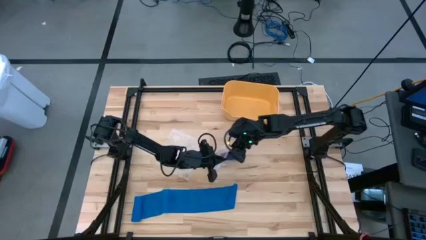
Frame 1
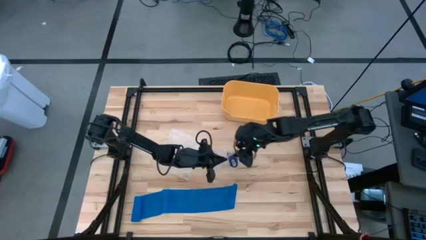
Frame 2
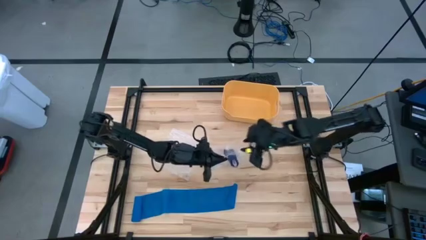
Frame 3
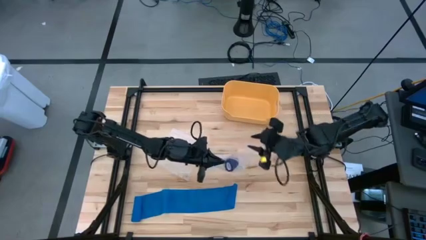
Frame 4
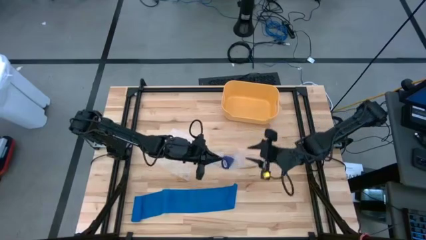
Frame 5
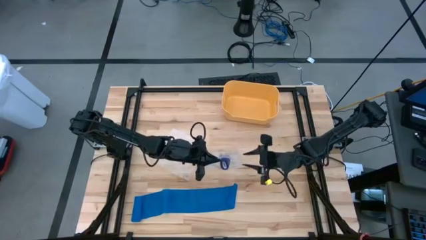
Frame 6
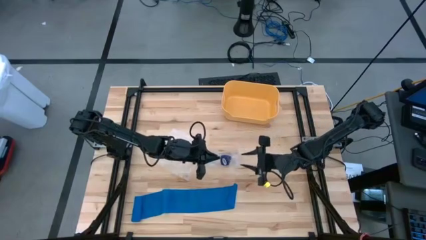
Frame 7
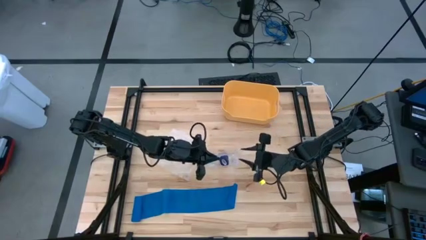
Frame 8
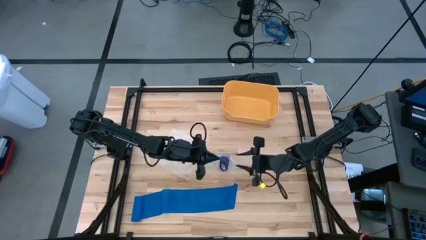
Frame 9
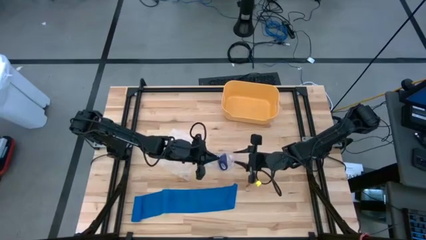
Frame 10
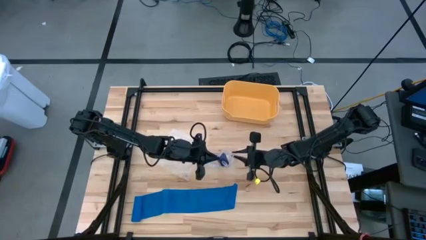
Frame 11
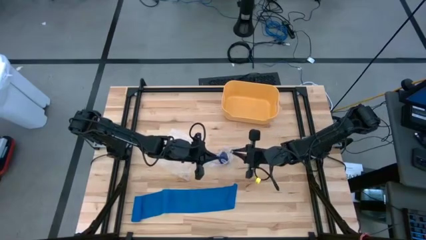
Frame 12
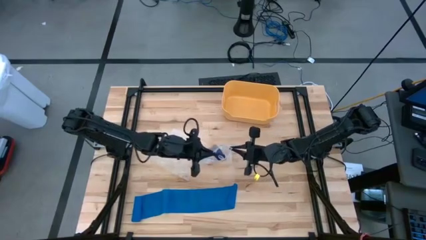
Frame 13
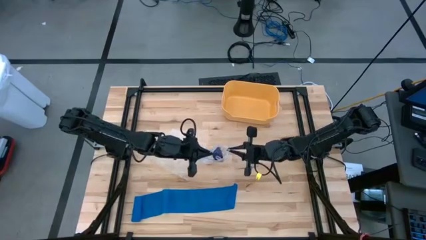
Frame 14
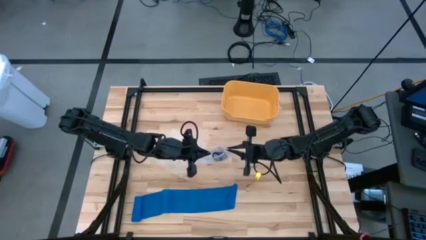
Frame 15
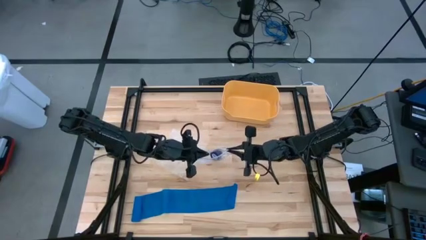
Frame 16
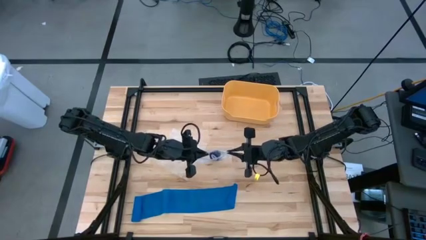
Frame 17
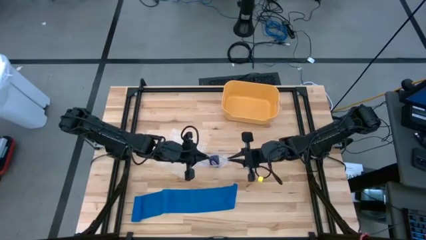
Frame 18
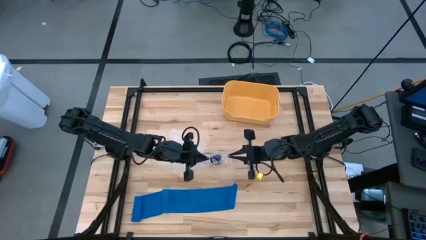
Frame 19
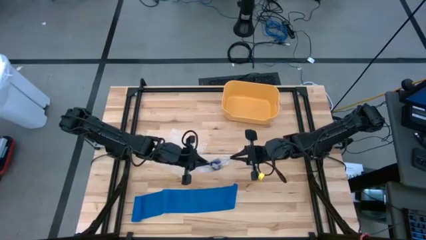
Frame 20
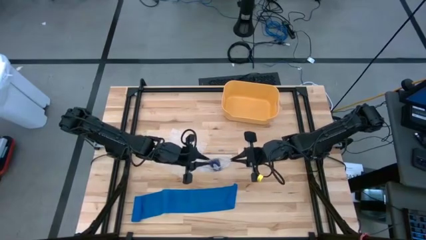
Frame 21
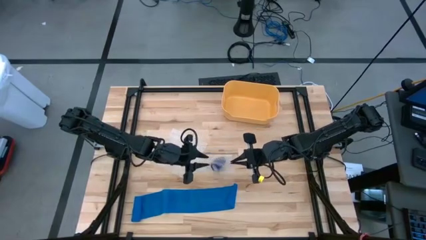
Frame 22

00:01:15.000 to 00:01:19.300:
Task: Roll bandage
Close the transparent zip bag

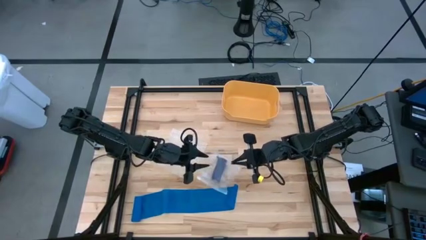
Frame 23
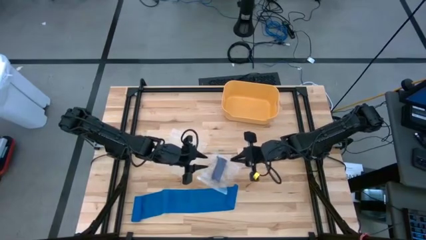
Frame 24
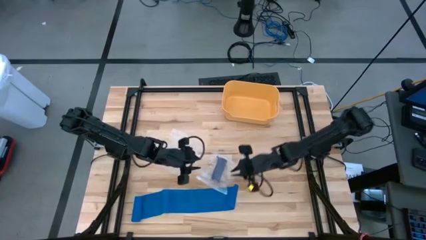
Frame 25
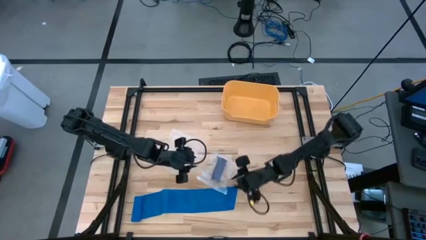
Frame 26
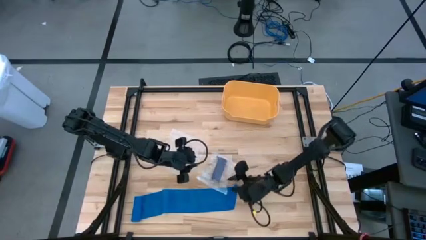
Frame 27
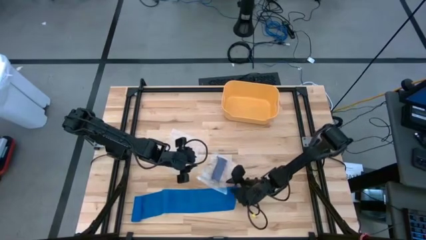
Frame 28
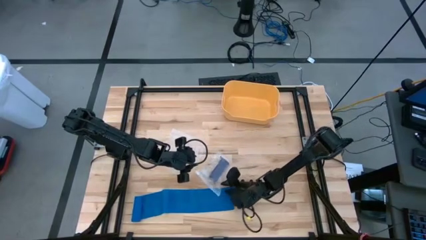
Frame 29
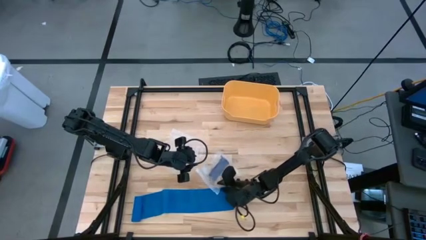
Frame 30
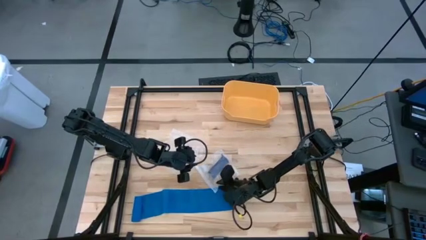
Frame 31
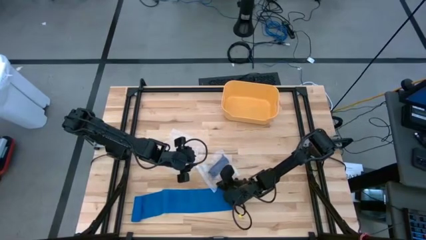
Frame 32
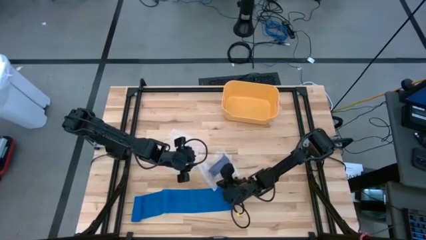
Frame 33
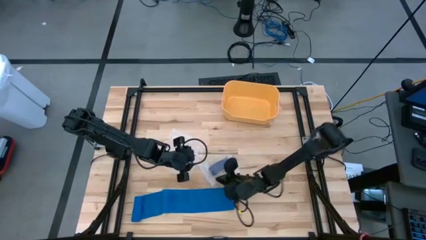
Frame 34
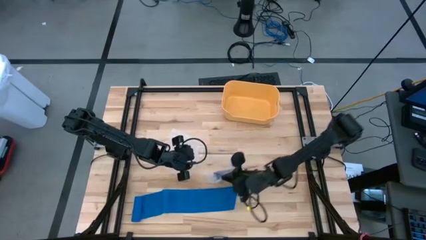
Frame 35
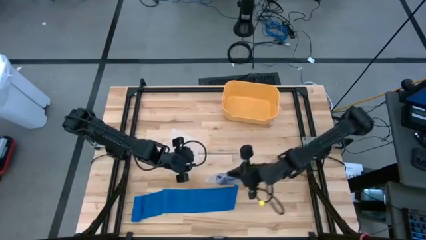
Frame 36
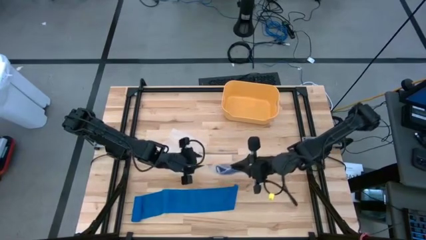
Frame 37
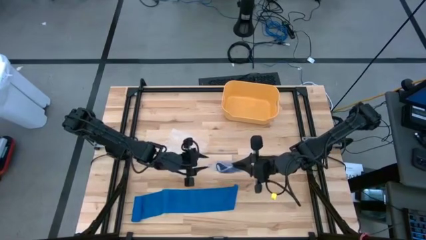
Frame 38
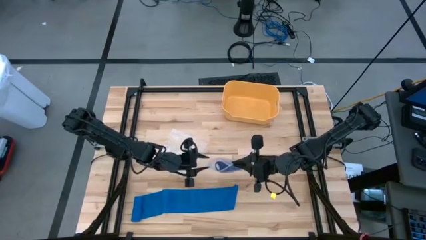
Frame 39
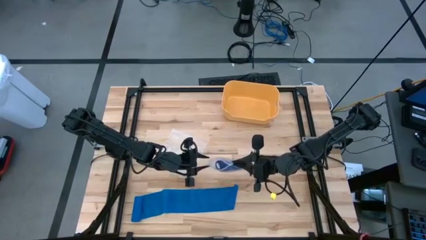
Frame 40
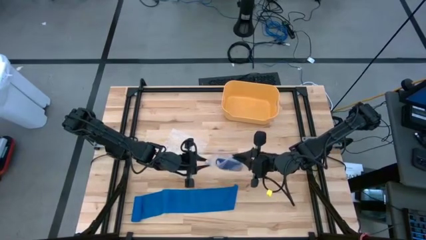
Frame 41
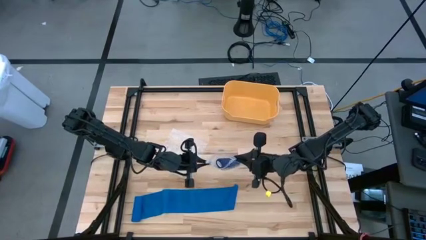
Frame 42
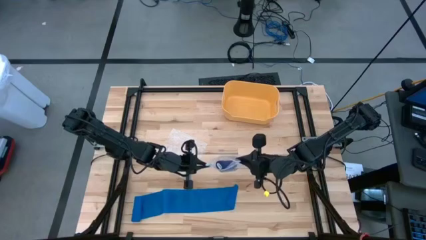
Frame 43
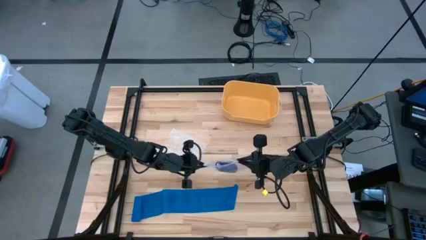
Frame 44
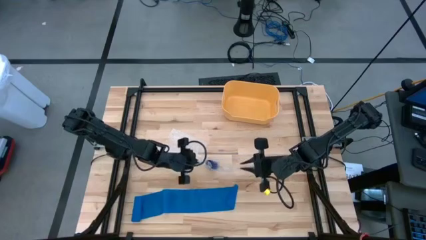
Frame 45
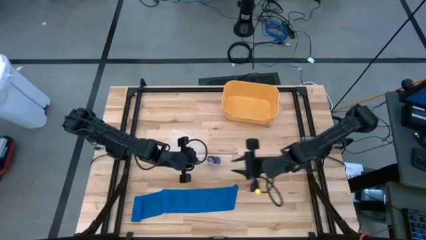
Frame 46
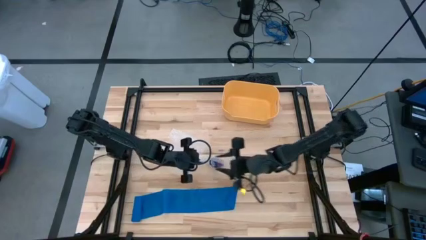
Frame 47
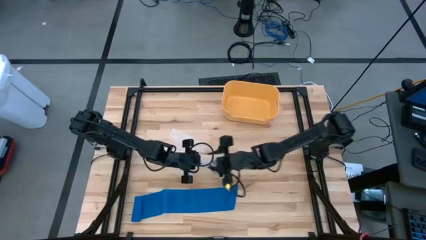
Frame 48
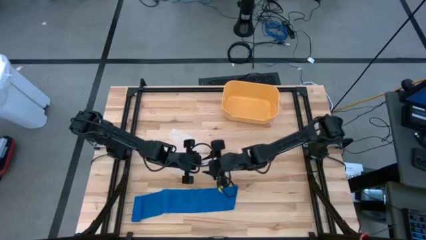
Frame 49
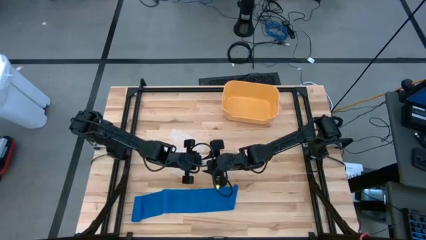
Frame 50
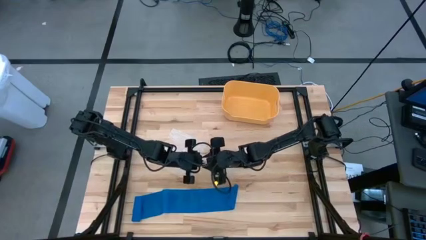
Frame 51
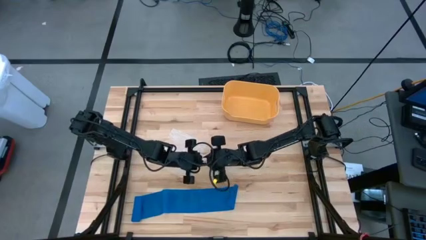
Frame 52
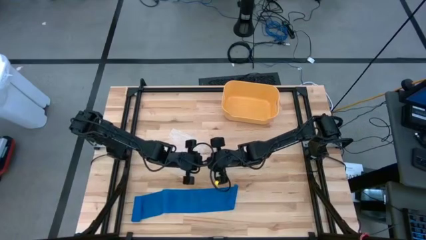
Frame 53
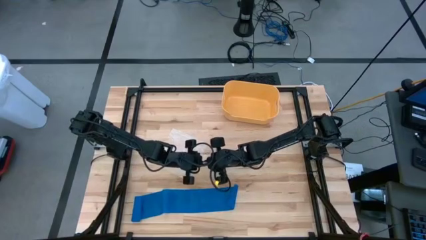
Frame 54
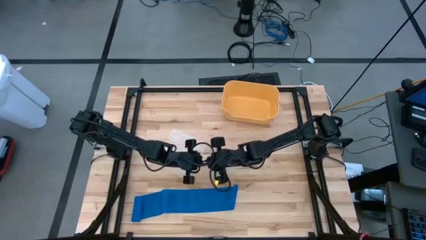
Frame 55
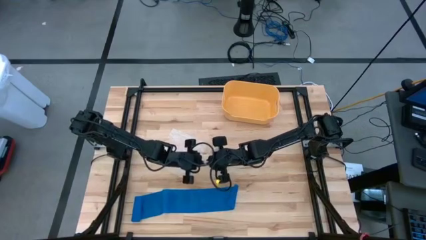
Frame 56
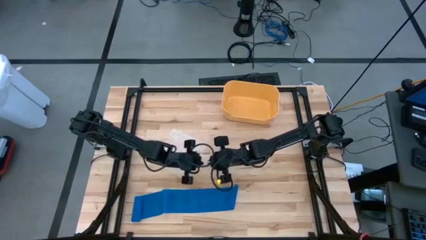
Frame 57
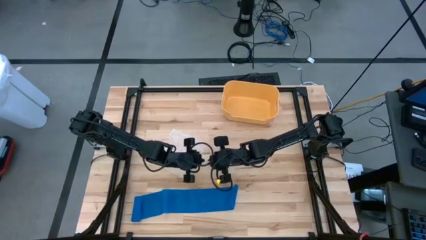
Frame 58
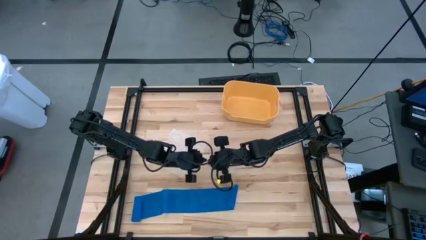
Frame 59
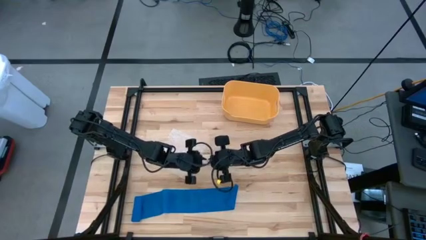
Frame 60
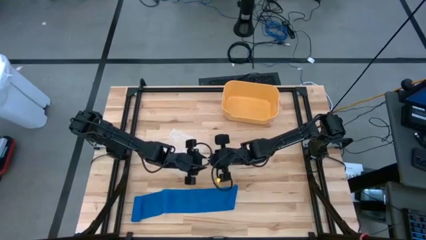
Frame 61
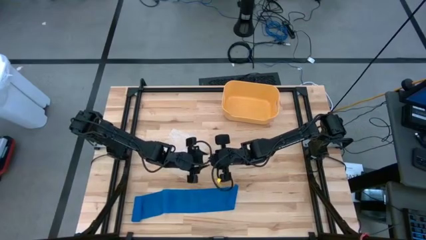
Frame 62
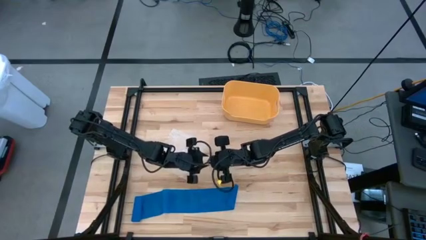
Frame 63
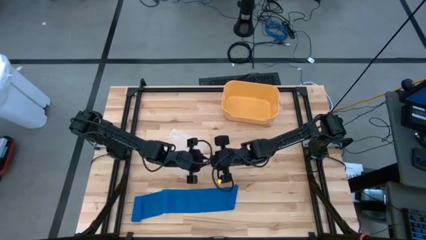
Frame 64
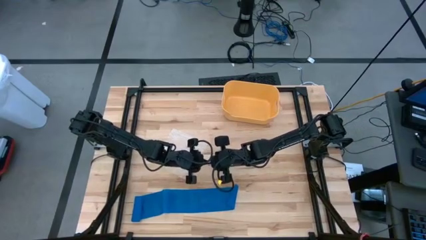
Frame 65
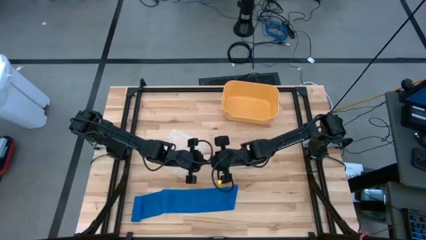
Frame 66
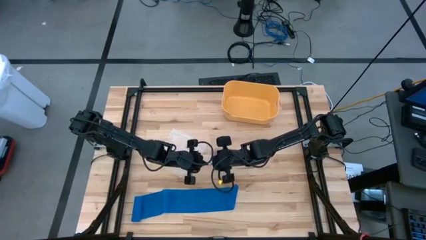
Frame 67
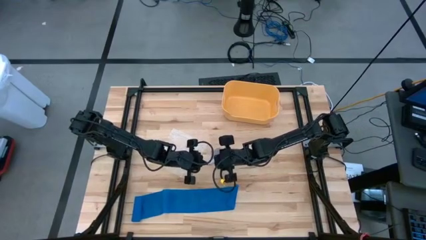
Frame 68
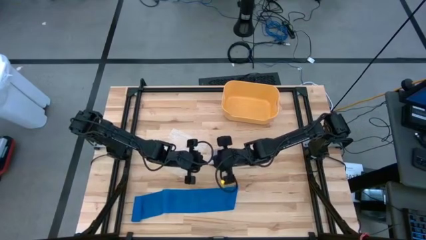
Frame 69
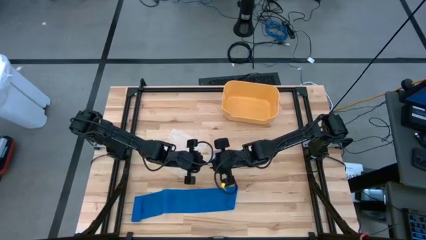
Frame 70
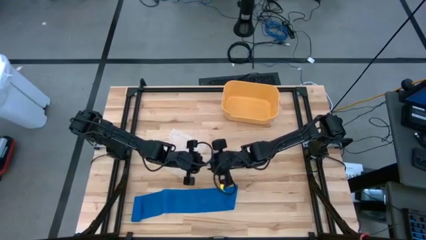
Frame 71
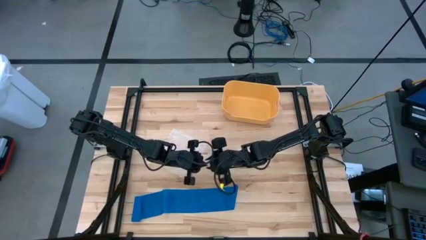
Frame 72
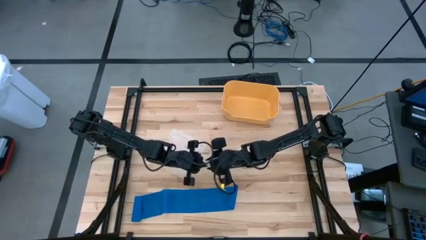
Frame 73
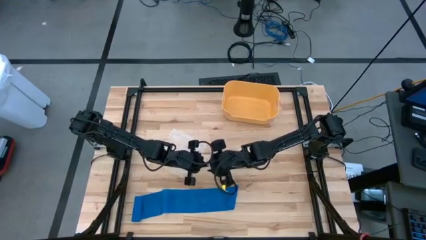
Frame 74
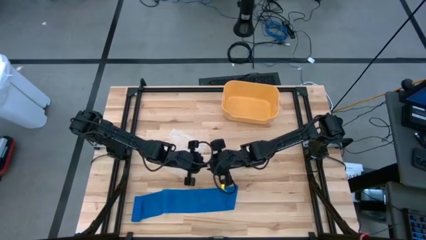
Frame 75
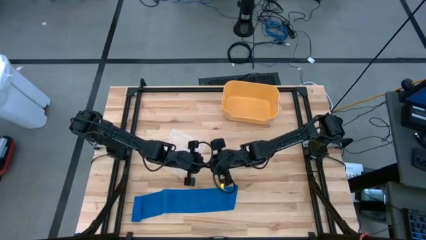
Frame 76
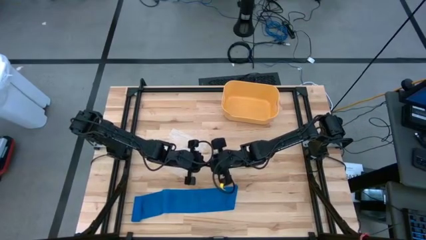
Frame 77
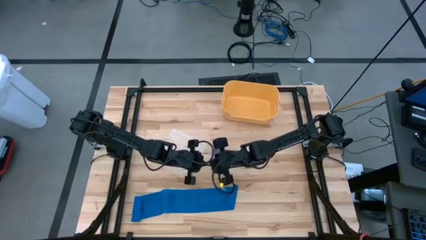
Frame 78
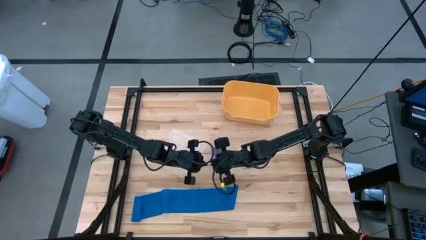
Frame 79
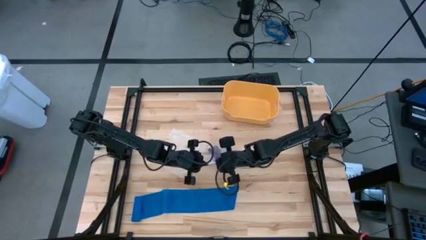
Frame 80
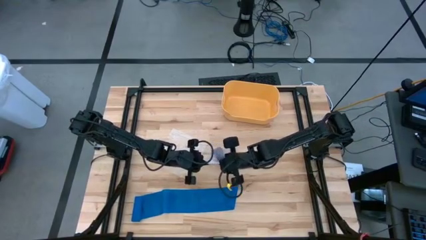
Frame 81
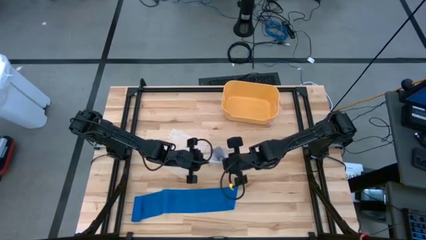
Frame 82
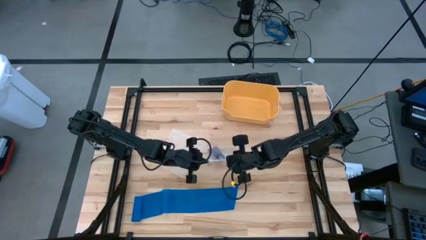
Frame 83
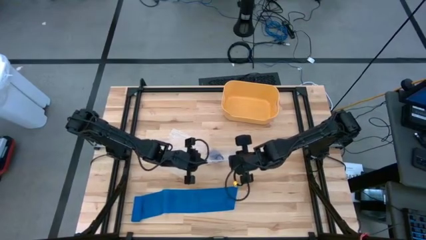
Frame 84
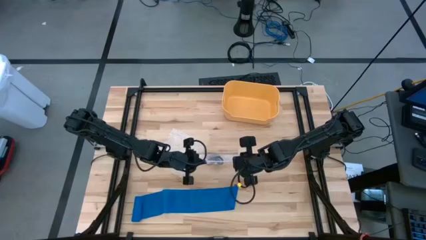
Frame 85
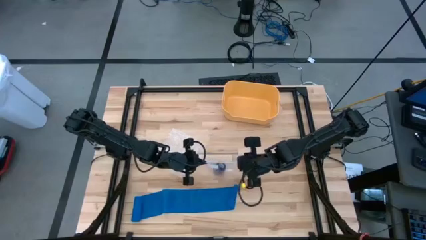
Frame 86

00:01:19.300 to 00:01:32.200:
Close the transparent zip bag
